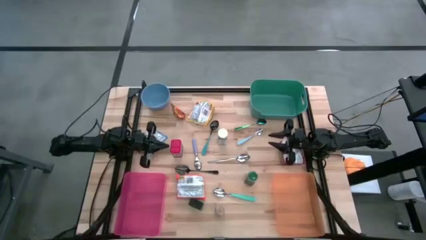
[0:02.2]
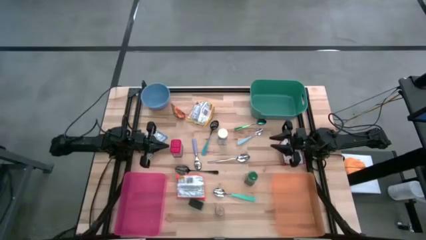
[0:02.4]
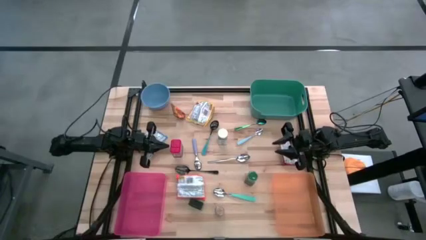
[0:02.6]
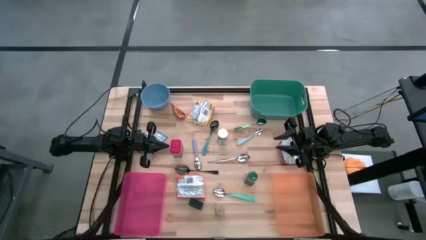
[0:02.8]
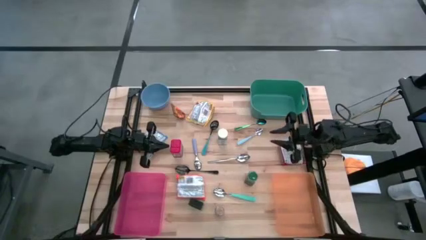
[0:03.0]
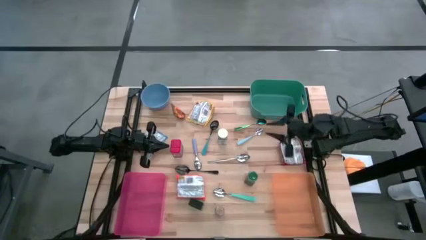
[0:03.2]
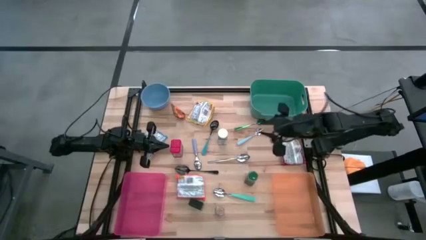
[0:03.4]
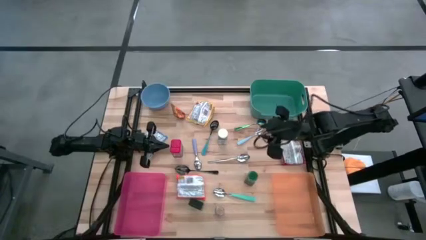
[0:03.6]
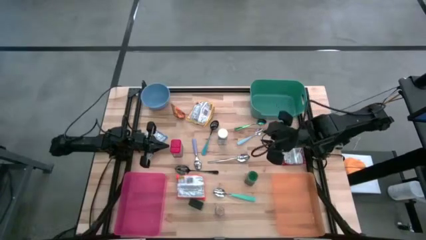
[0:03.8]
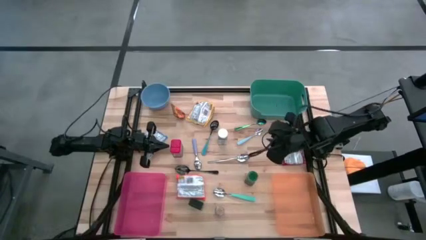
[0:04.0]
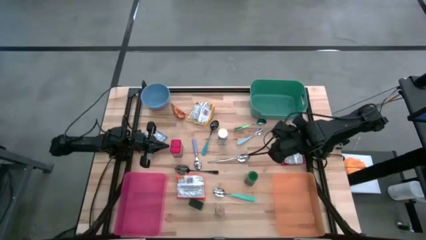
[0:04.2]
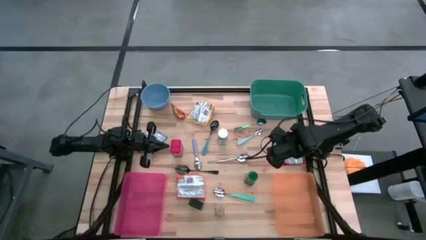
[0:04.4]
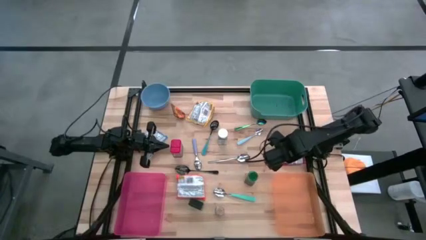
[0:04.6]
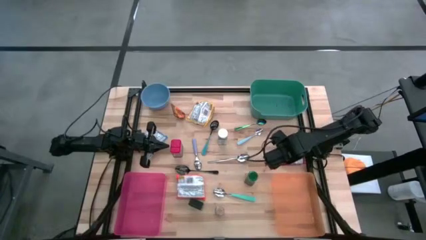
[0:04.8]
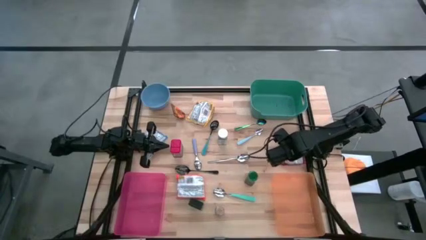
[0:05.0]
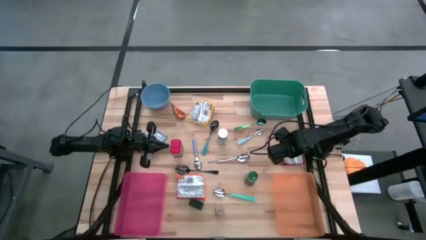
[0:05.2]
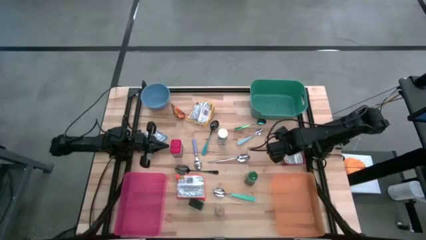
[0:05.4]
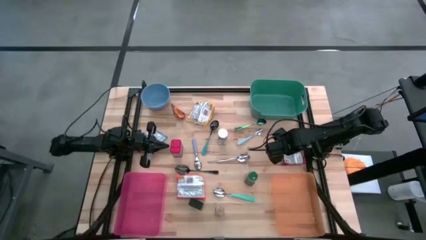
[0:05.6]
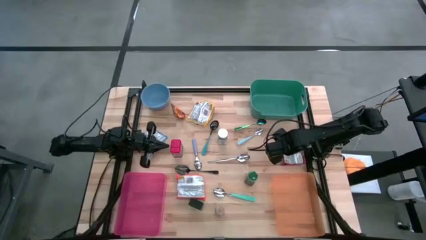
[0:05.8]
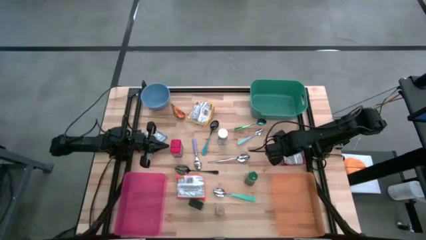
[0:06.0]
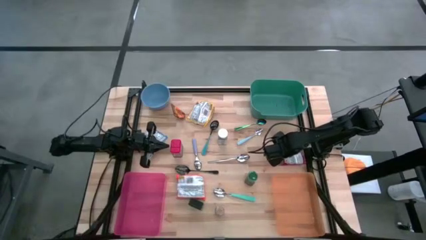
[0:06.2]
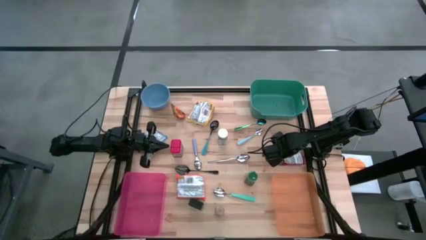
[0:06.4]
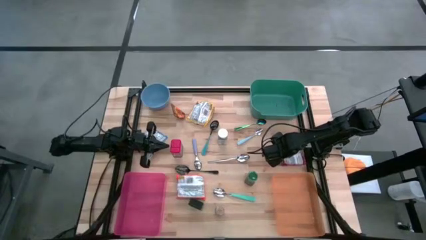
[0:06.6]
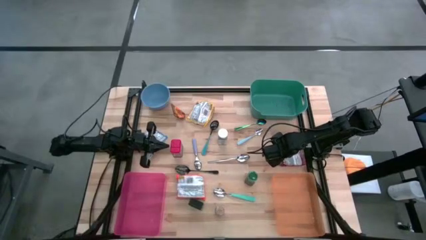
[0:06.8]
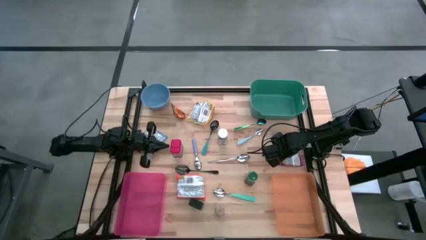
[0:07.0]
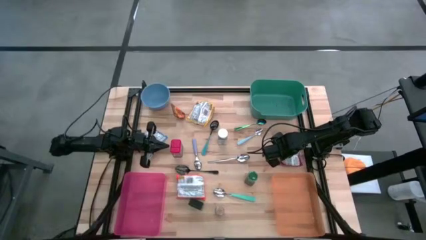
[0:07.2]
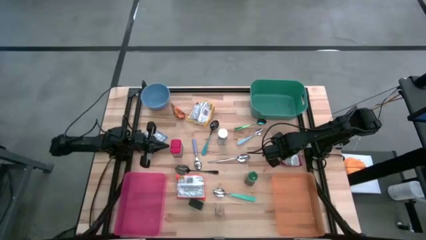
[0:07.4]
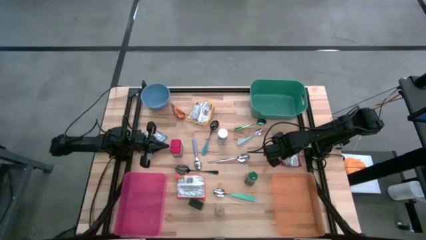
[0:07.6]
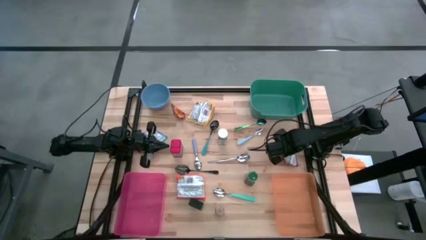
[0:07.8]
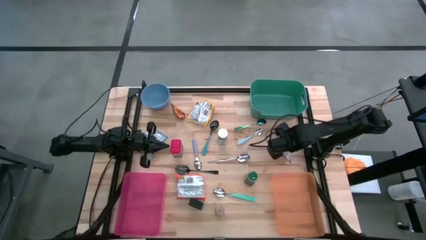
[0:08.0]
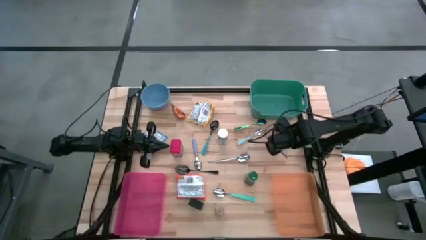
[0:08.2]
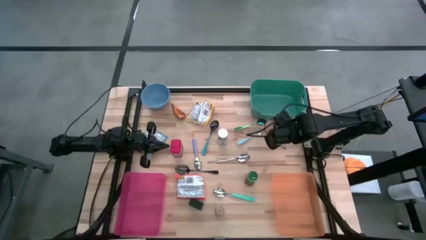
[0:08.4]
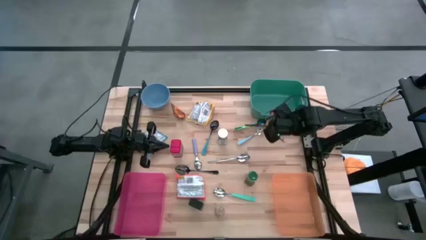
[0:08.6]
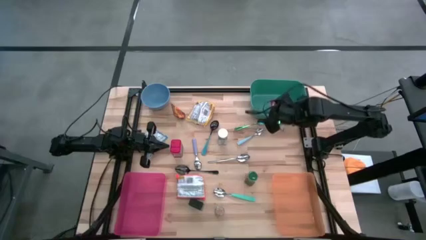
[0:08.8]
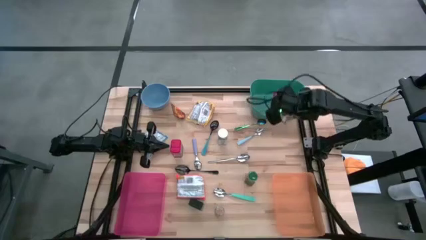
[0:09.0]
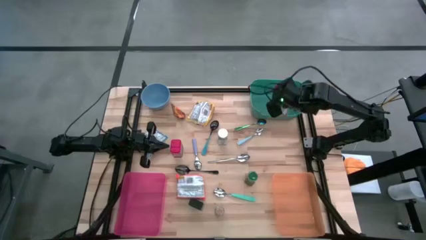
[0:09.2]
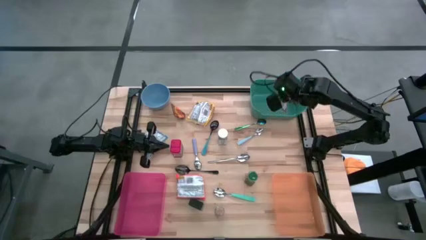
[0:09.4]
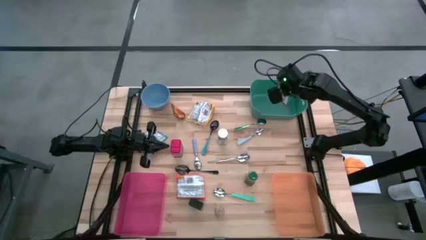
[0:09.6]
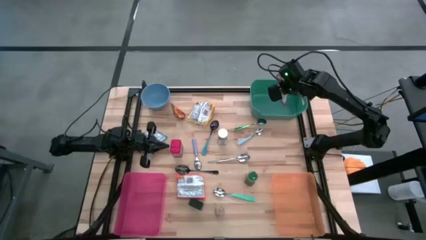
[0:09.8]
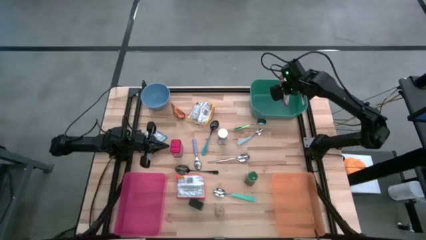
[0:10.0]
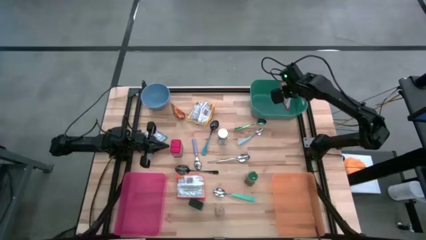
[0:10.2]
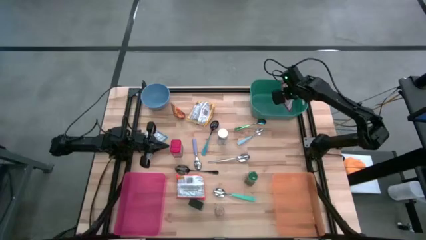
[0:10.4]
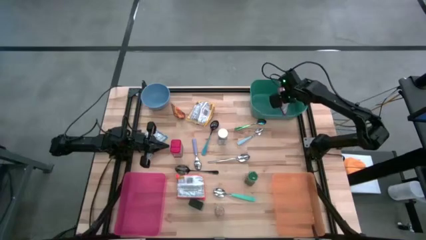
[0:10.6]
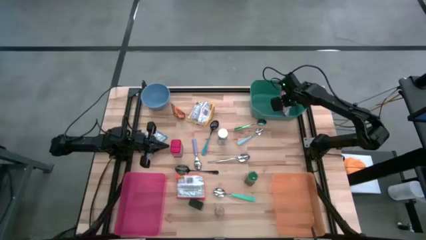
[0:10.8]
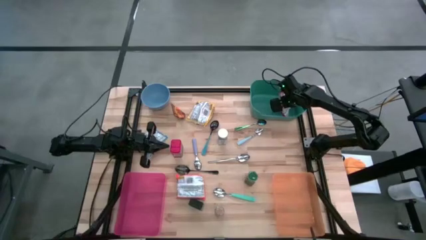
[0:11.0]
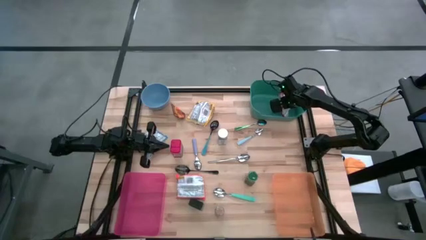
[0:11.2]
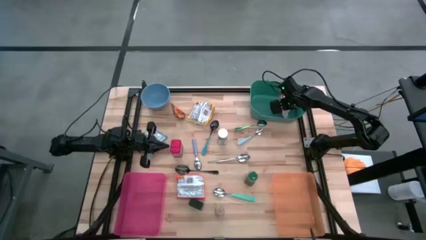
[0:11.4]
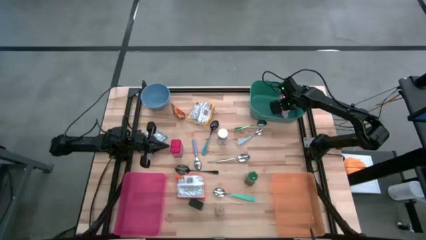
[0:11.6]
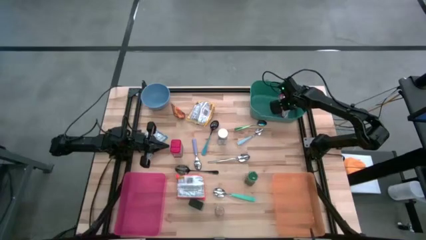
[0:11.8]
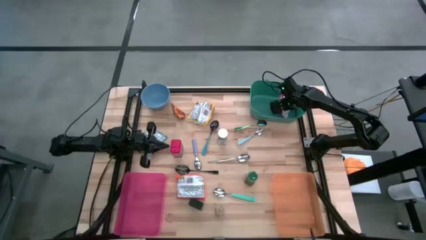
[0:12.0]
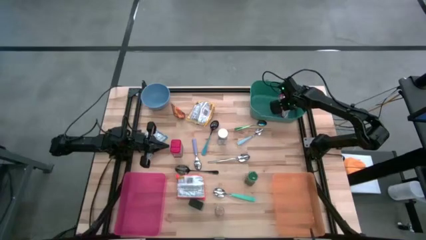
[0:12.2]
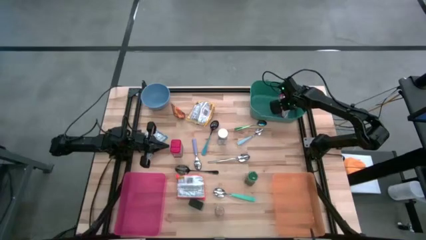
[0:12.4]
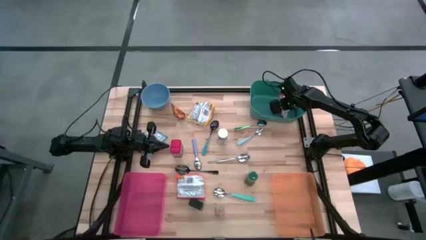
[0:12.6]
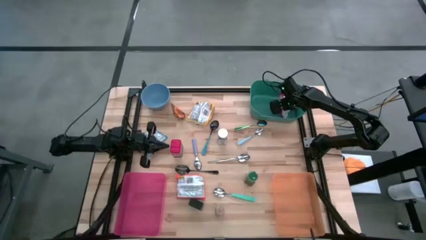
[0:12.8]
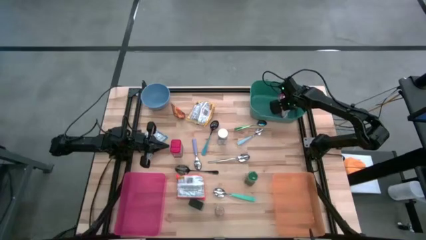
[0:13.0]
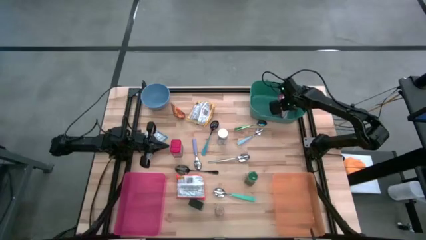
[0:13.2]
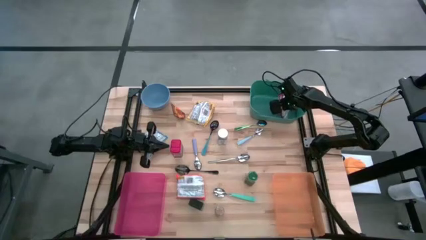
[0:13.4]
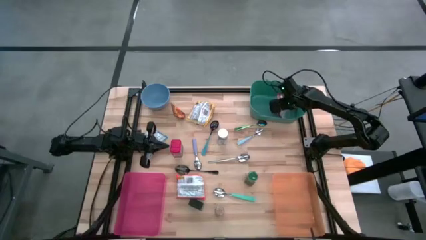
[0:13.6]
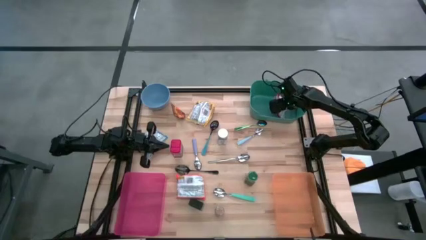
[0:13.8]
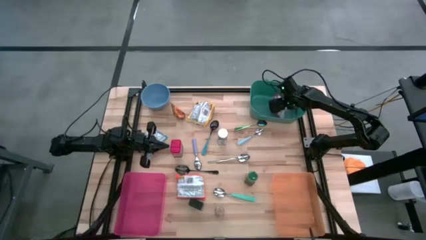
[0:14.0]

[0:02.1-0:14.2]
Put the red noodle pack into the green bin
